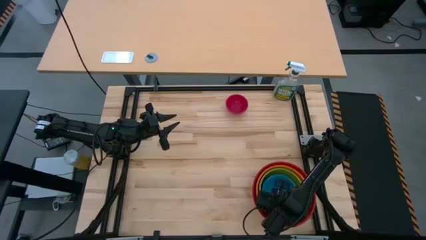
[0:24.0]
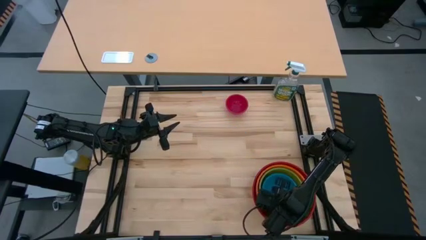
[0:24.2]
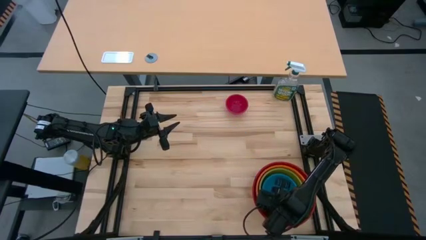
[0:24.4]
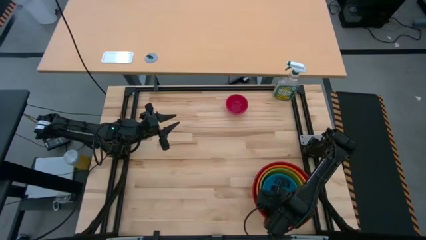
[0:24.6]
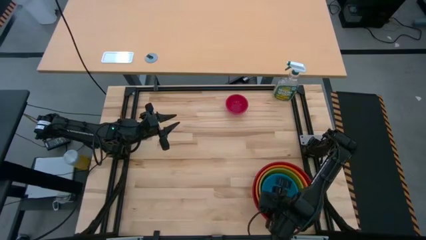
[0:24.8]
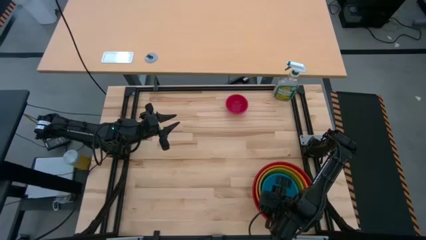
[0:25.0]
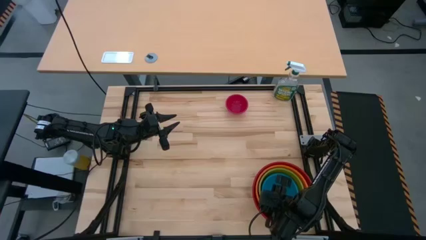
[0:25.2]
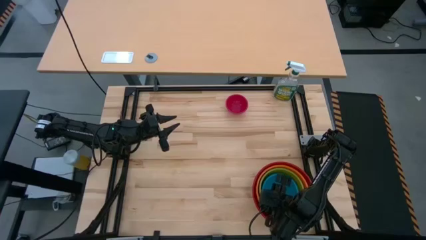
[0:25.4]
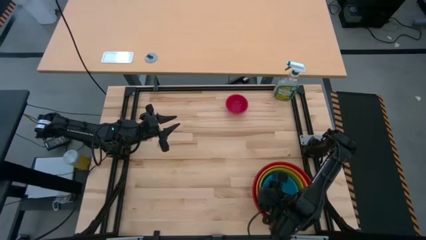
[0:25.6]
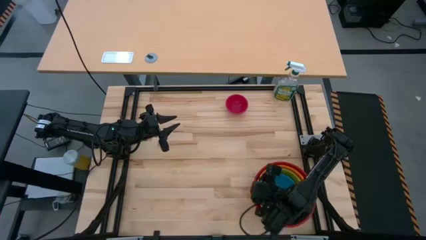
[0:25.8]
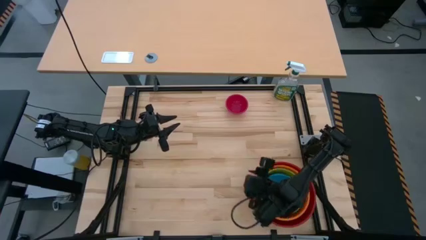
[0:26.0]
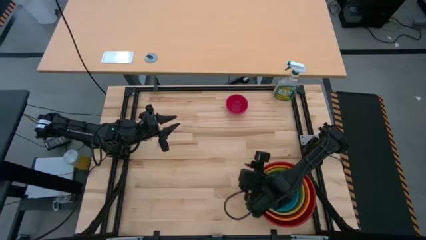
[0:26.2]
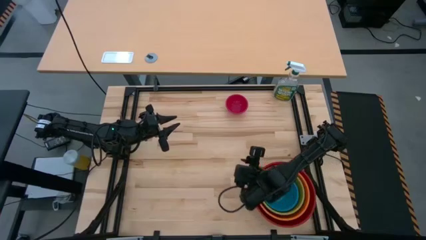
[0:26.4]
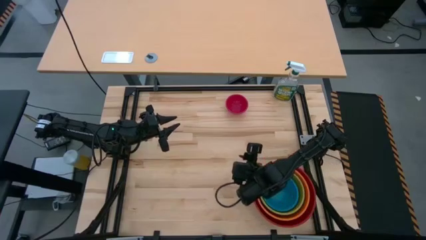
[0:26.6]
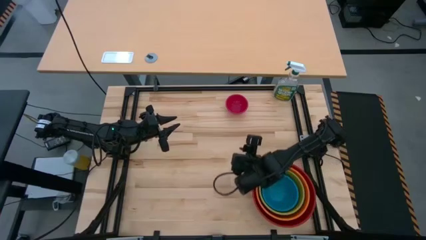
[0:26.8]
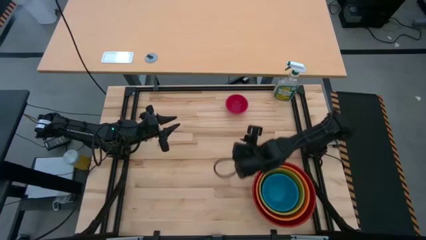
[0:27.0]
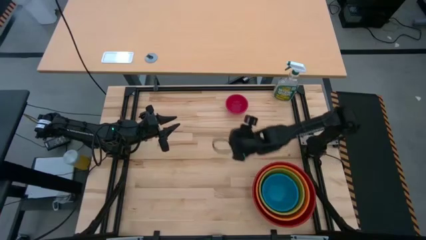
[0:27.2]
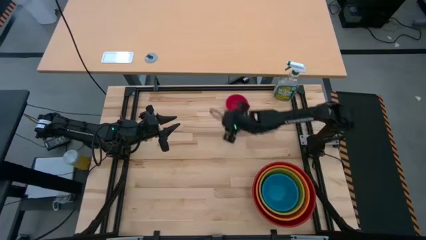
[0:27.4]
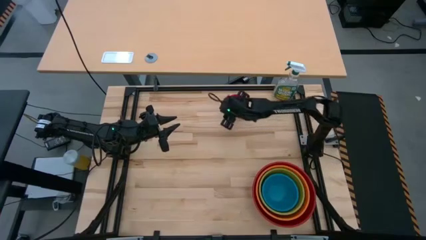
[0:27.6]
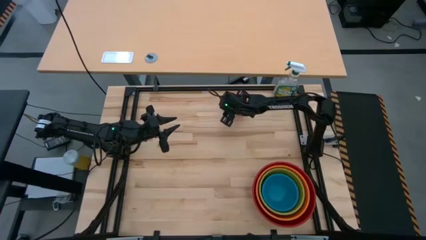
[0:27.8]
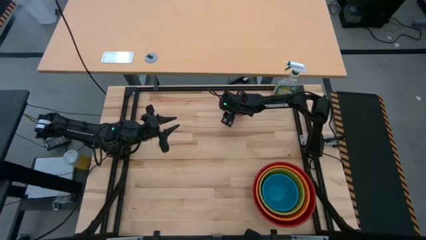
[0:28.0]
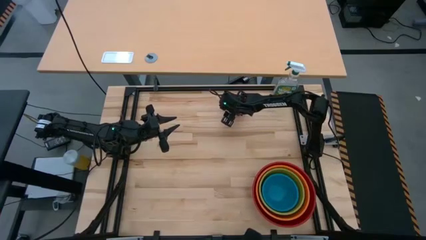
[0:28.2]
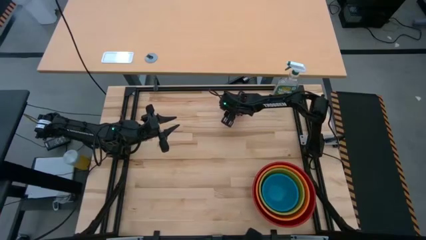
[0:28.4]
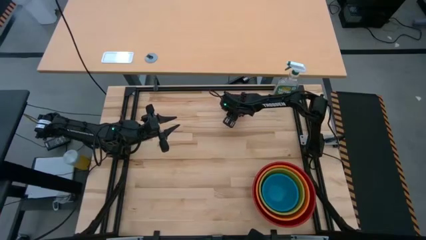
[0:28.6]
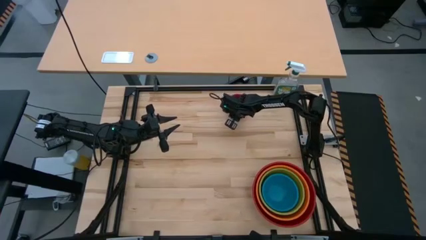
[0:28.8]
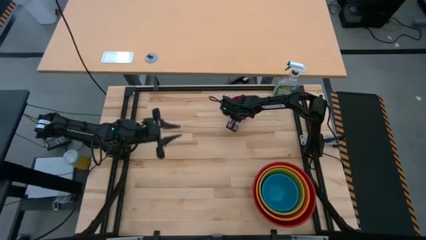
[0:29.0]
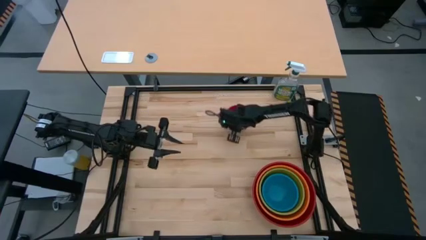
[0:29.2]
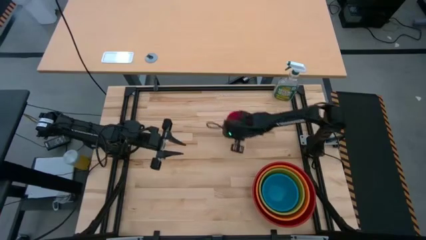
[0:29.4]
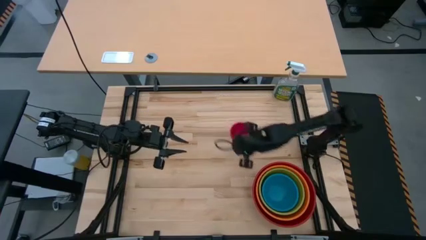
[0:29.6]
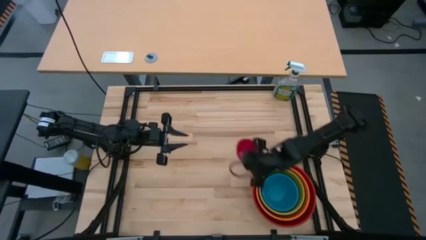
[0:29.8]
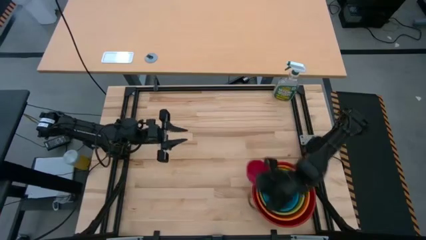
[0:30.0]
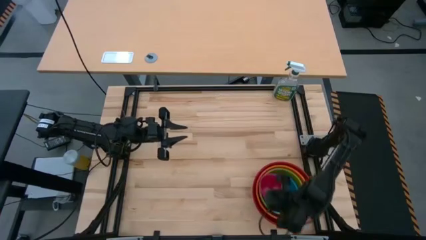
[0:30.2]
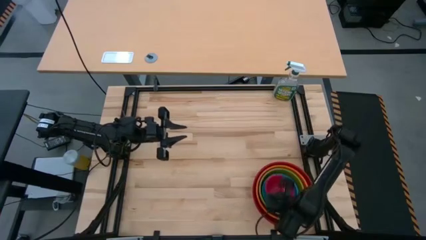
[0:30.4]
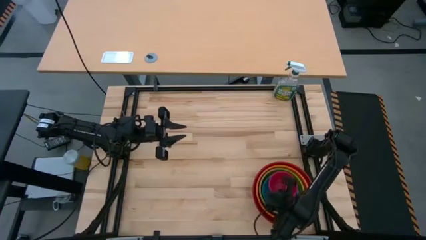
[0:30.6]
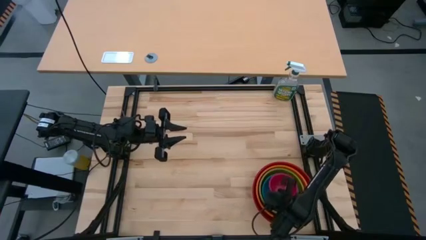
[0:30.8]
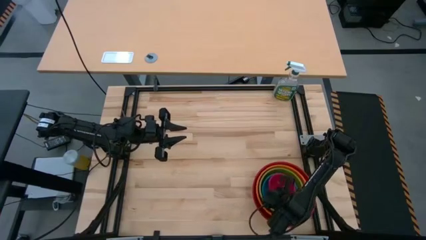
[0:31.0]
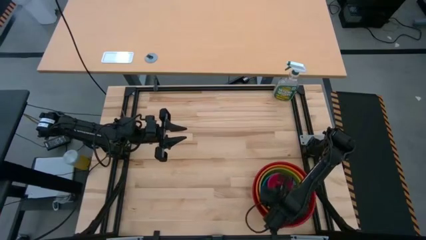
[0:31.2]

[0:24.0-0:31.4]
Stack the pink bowl on top of the blue bowl

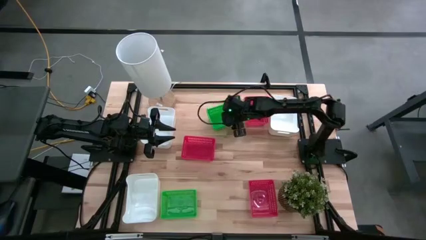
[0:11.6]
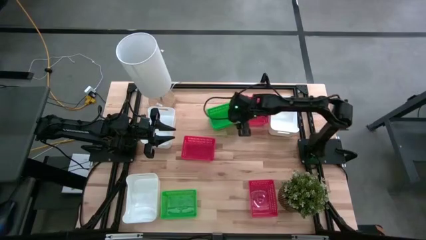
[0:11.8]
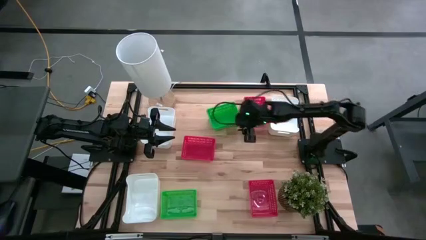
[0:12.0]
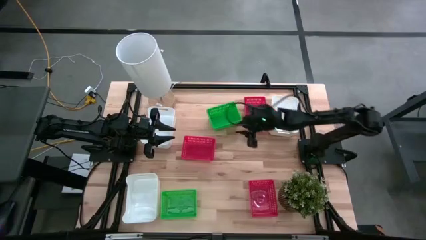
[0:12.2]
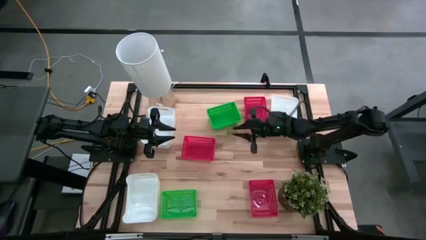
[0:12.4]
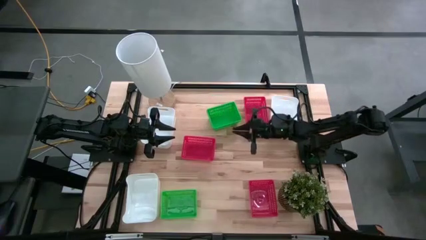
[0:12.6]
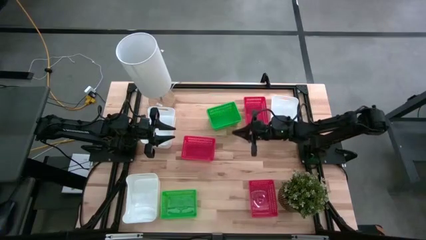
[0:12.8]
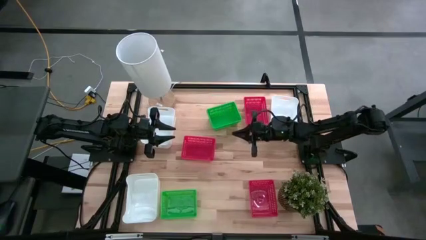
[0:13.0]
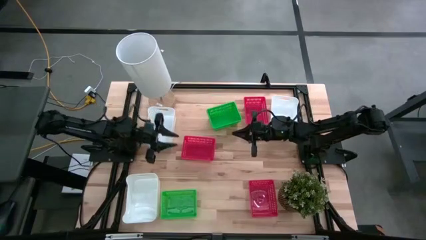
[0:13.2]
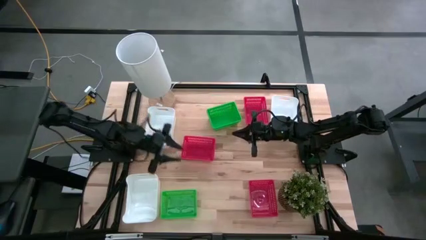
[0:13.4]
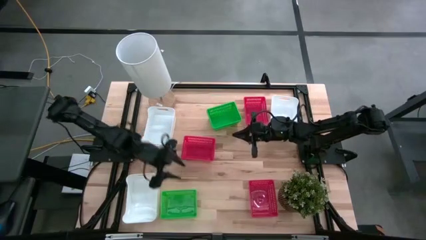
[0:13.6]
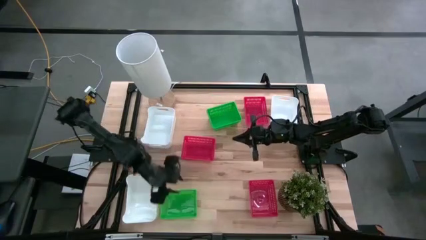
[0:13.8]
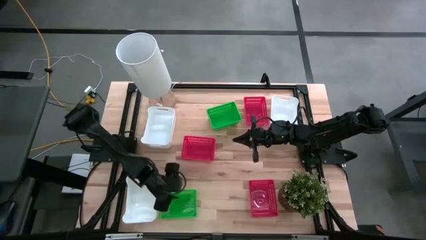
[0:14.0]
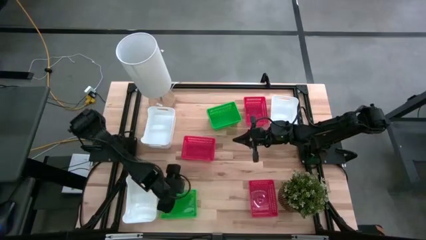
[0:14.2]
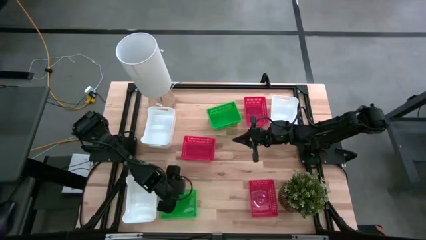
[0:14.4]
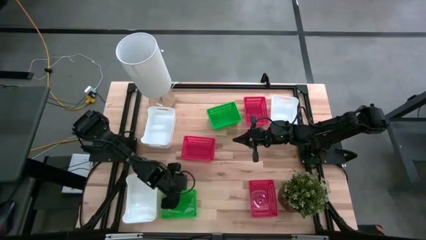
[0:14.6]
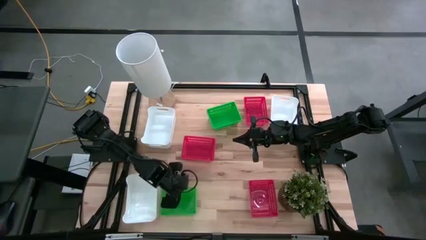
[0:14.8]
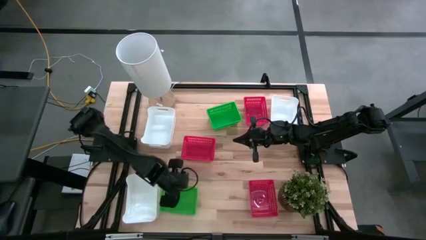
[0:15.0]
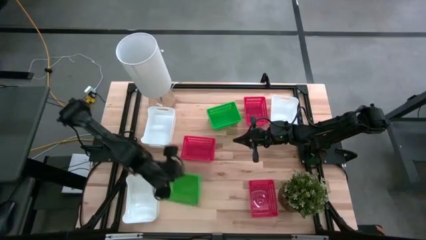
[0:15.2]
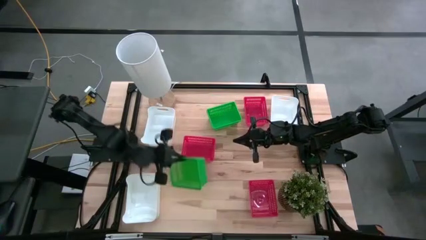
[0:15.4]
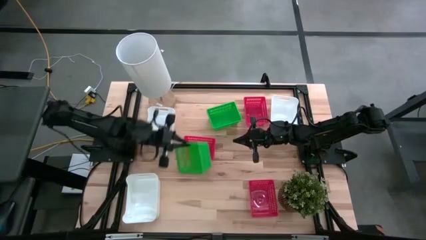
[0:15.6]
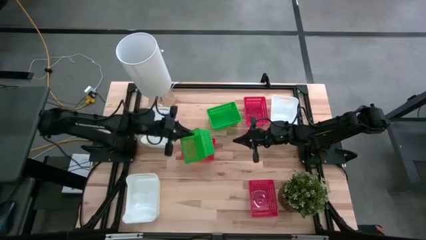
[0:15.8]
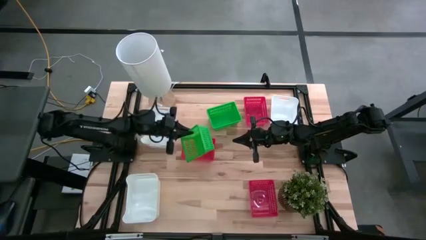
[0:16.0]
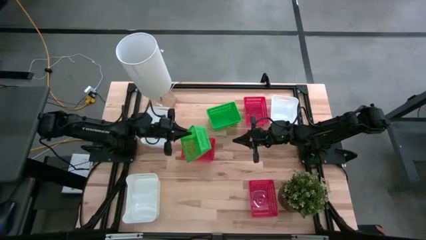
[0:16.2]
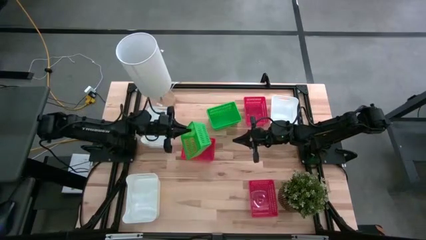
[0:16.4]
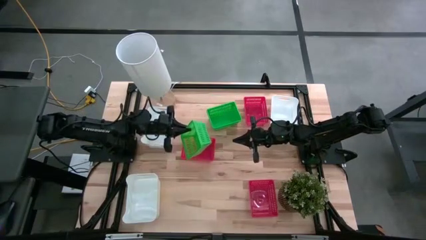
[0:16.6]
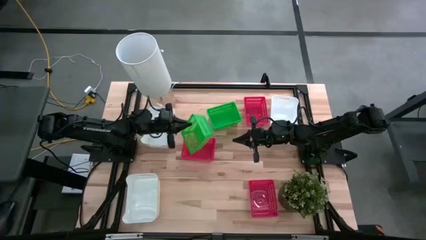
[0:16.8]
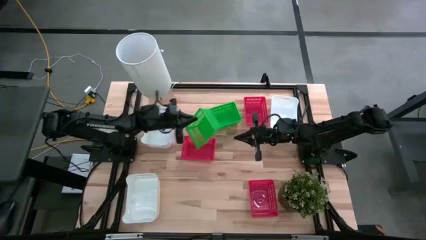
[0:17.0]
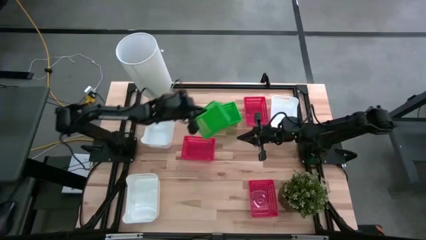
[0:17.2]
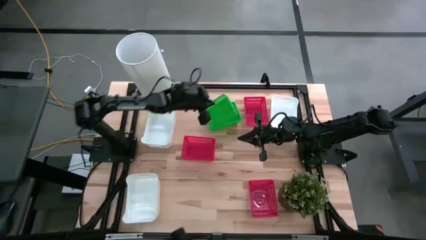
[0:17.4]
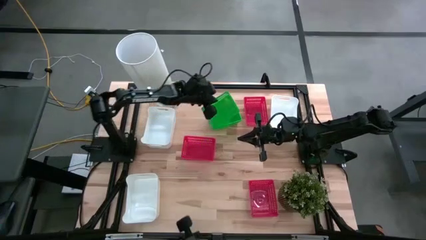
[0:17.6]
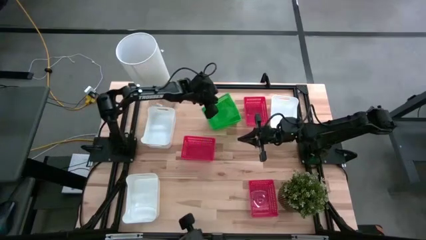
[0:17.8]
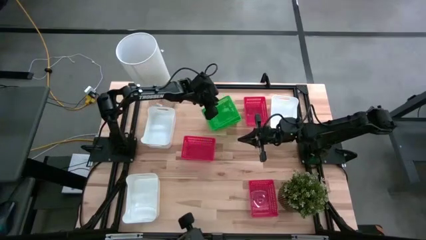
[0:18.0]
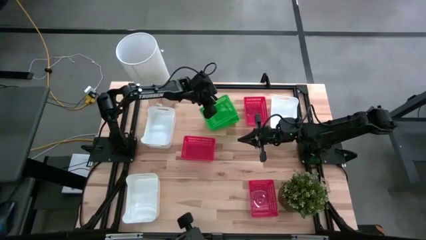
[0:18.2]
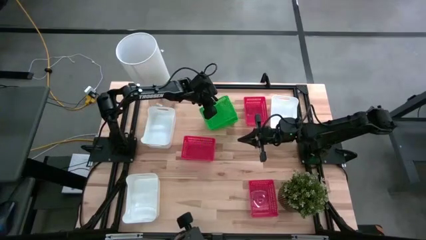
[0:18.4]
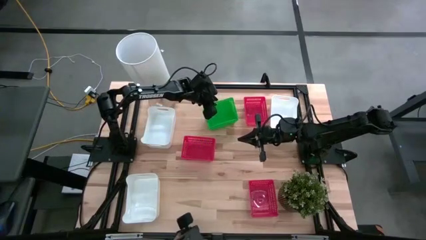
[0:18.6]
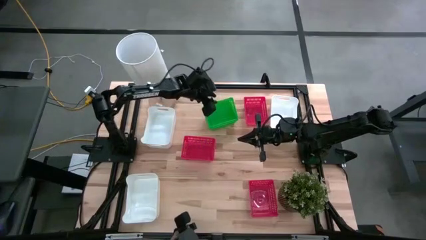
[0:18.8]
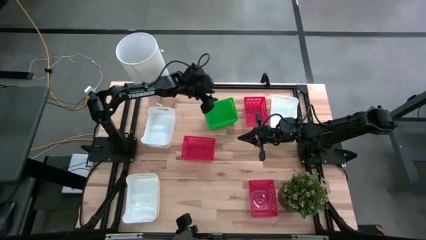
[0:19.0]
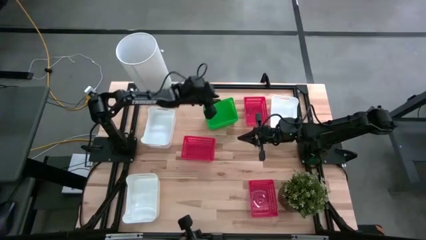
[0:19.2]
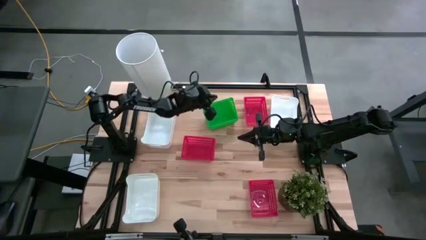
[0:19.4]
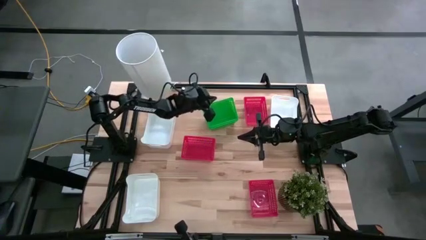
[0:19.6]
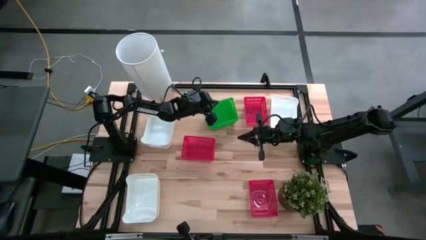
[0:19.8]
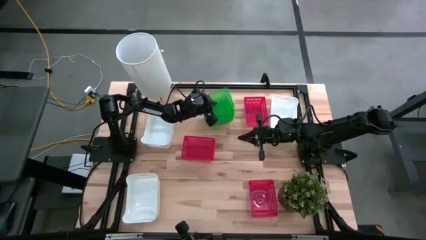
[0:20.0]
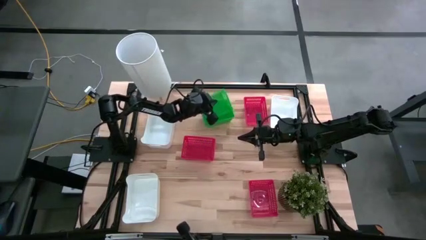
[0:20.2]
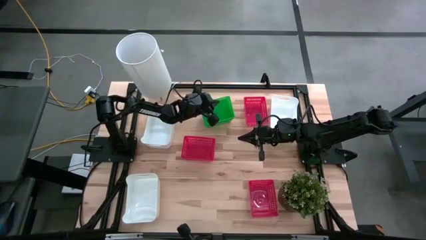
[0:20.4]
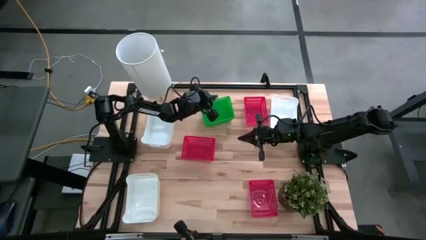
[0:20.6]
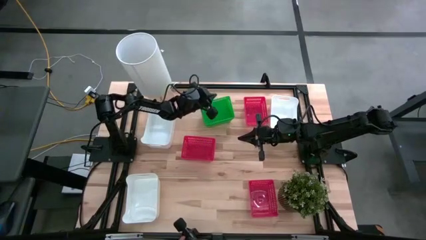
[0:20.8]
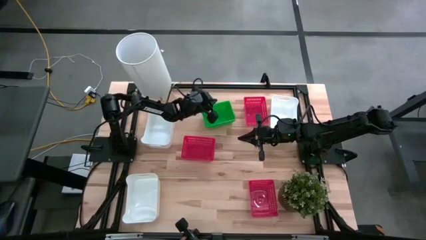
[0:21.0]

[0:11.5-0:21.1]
Stack the bottom green bin on the top green bins
